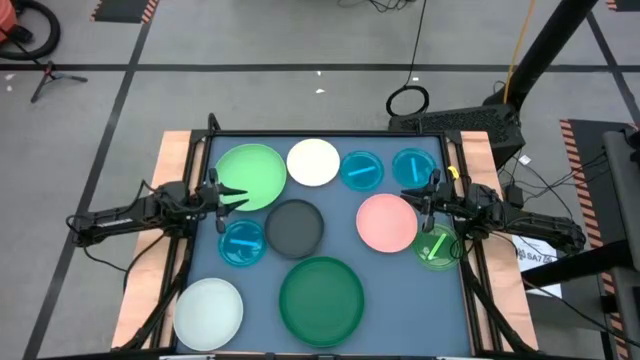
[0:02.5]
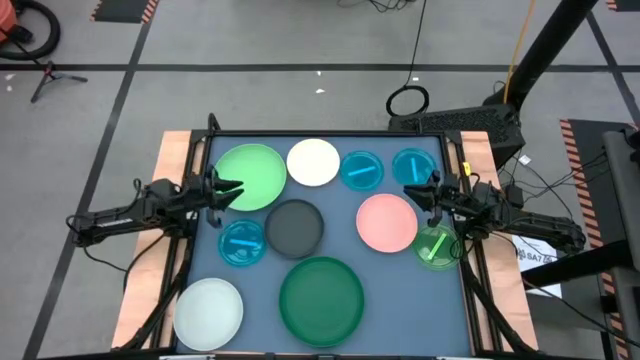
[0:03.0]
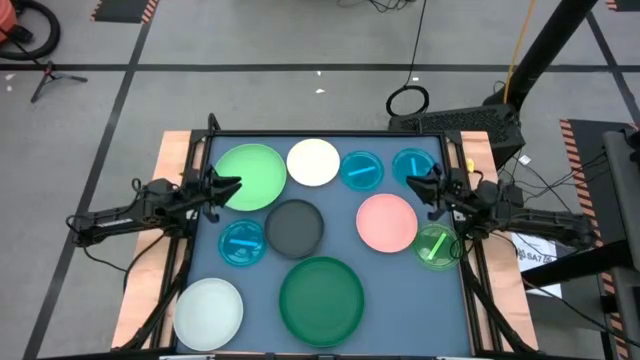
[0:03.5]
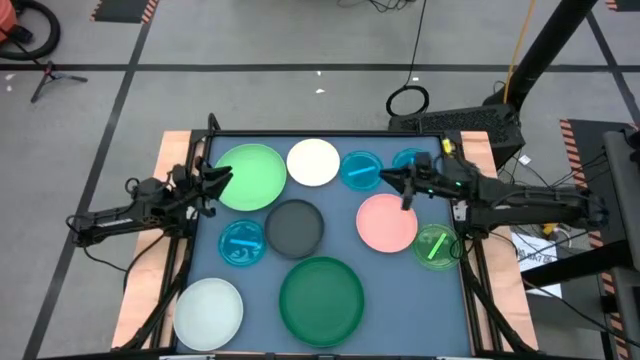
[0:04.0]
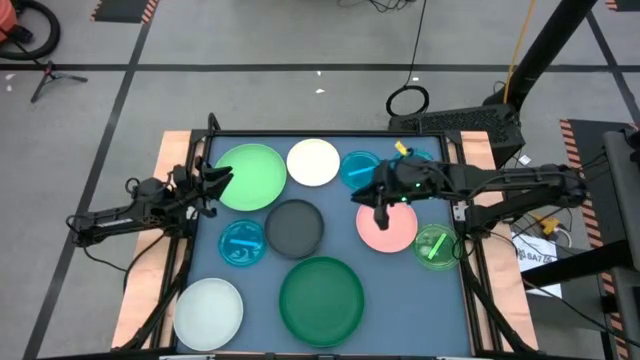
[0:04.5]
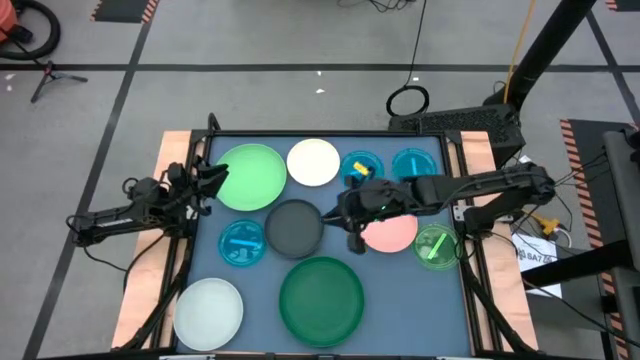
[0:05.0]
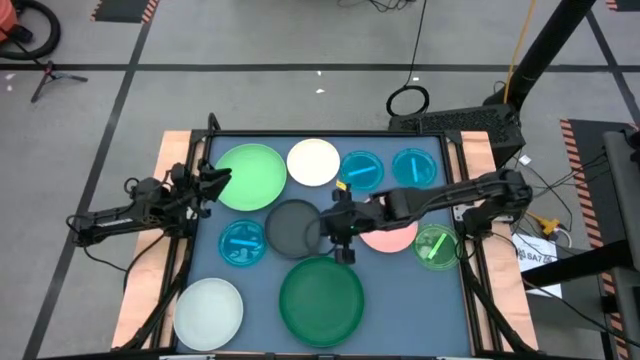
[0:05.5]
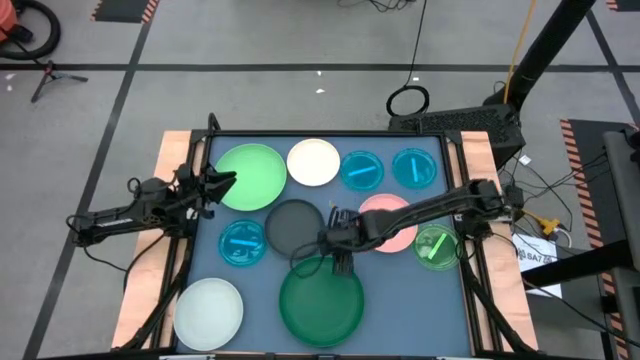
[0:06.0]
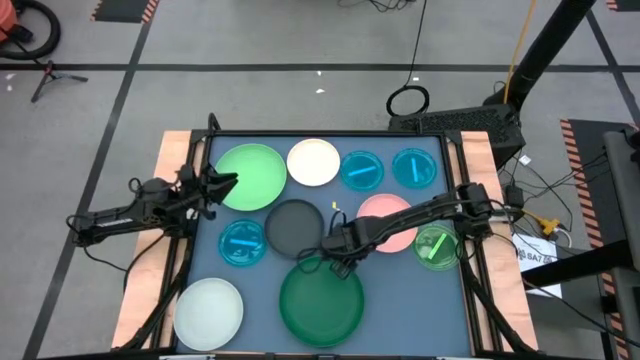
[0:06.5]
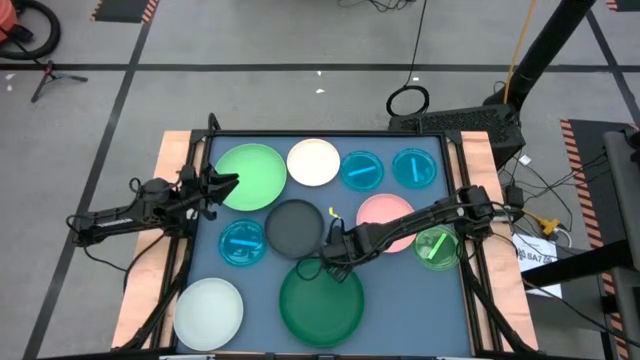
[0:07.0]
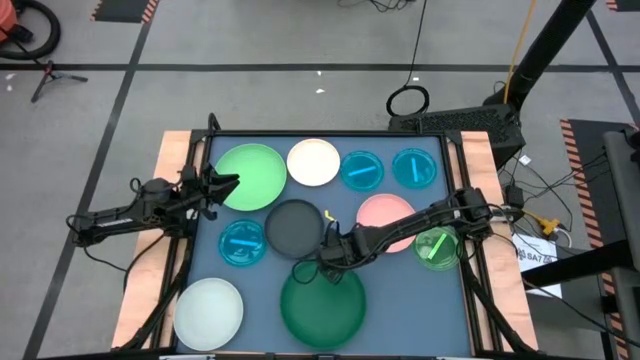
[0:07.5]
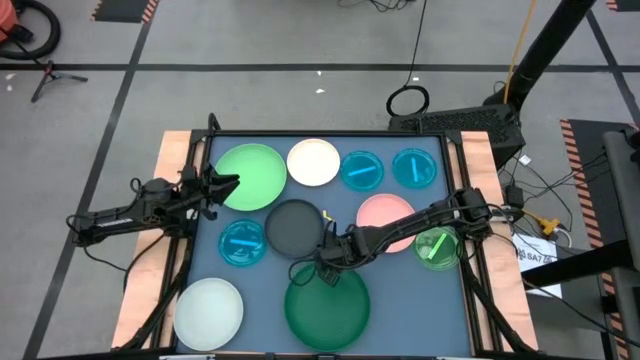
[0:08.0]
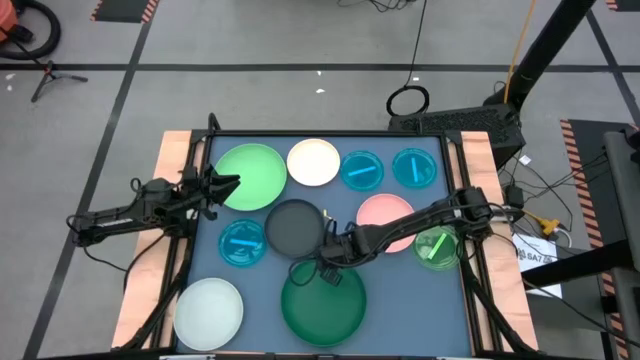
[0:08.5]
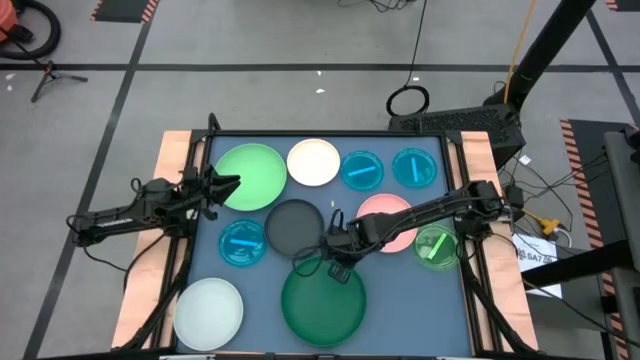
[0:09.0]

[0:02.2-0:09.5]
Task: Stack plastic plates
Stack the dark green plate on top of the green plate

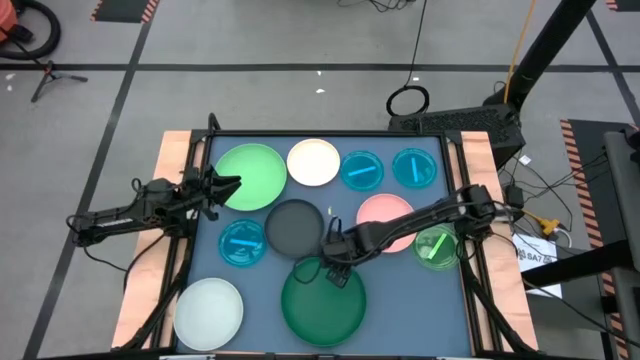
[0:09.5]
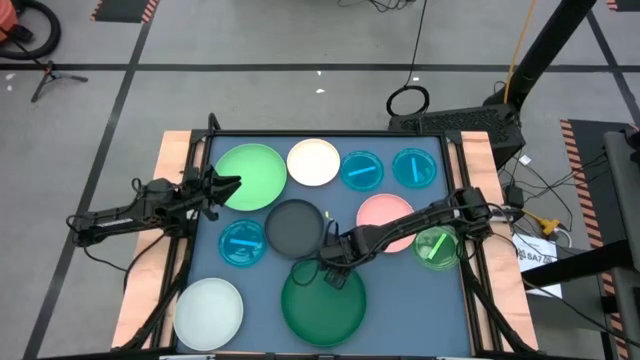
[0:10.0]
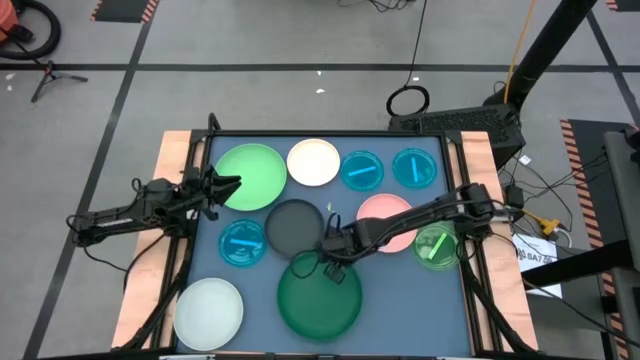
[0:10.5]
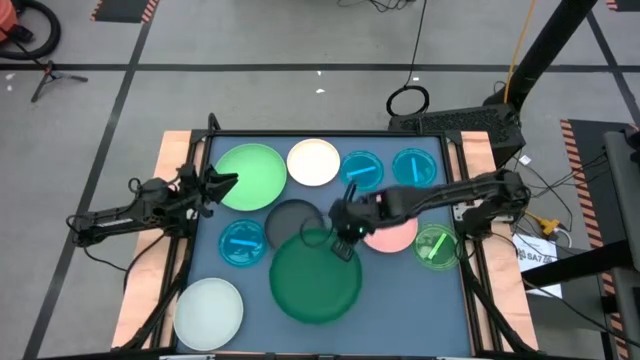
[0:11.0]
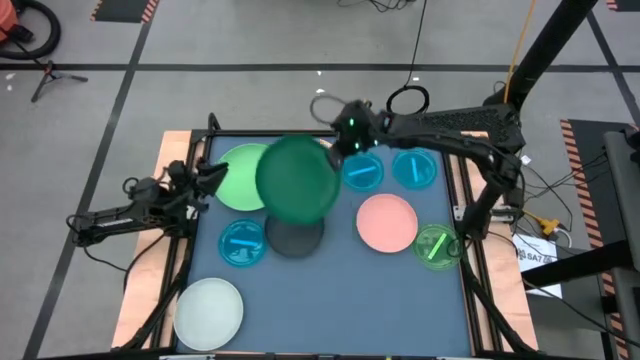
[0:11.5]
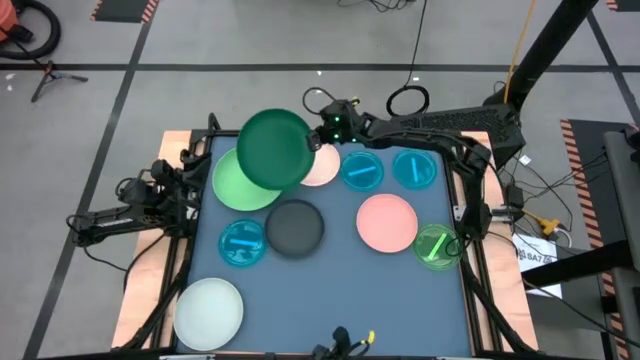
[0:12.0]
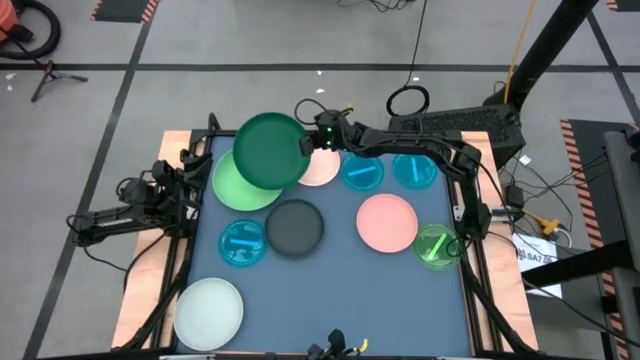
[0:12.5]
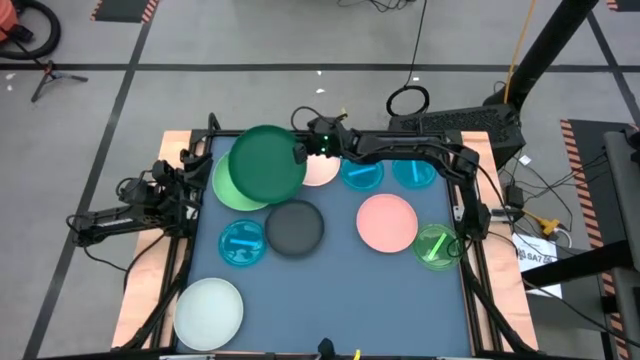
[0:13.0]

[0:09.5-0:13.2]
Stack the dark green plate on top of the green plate

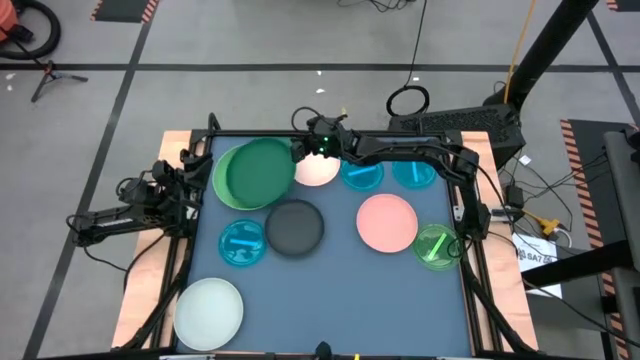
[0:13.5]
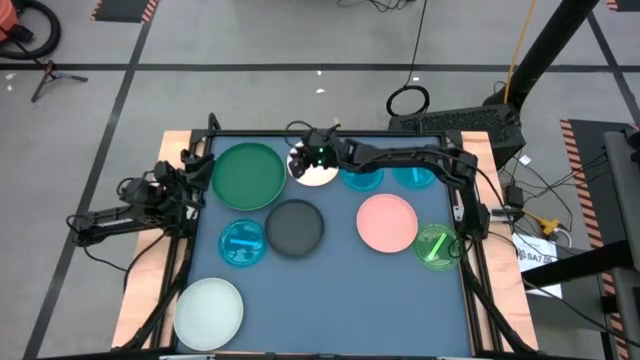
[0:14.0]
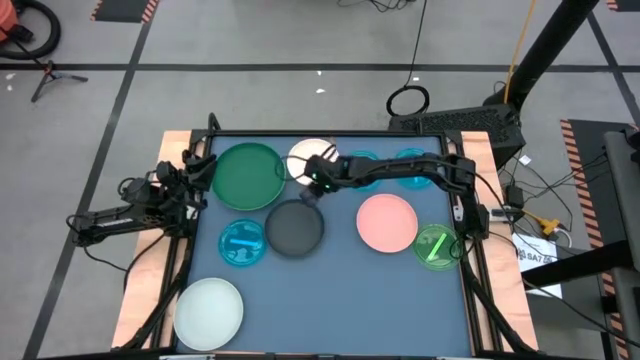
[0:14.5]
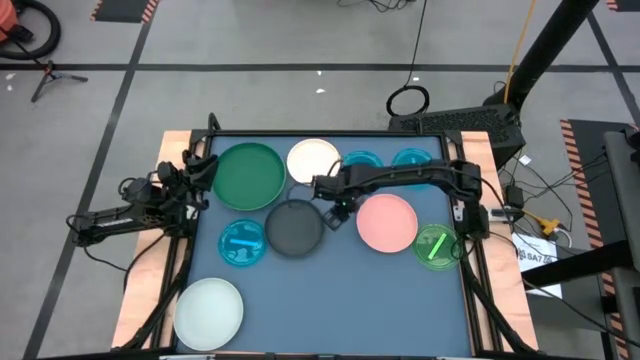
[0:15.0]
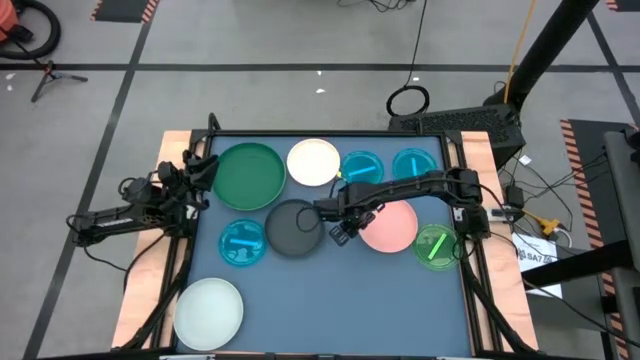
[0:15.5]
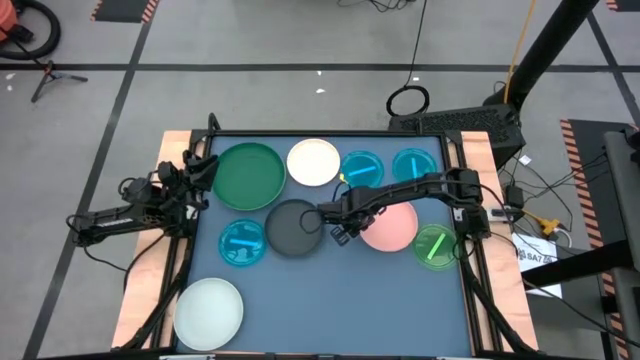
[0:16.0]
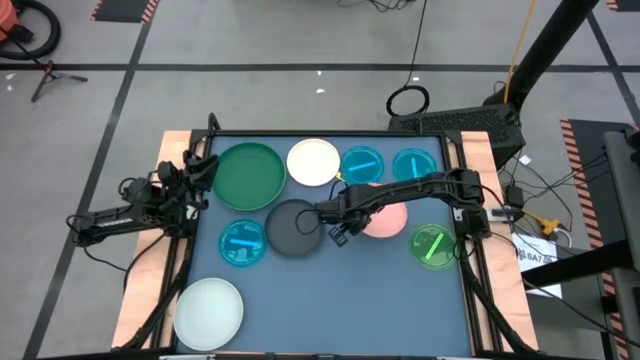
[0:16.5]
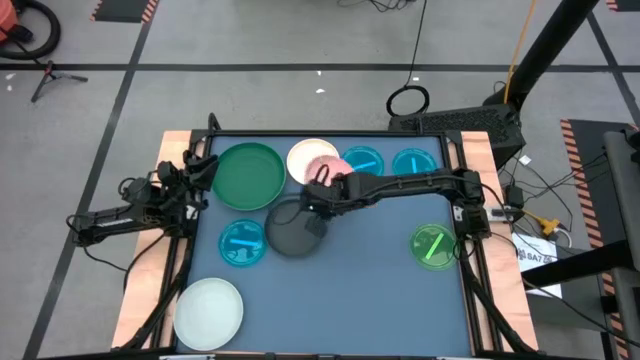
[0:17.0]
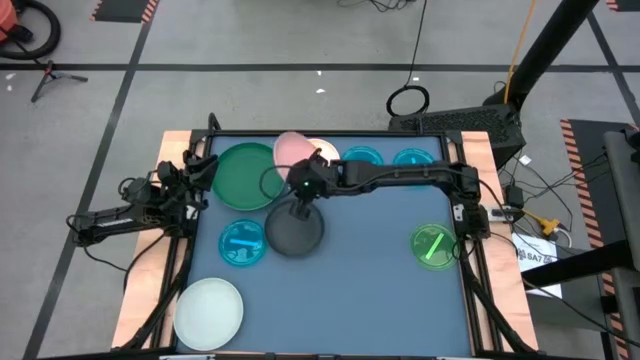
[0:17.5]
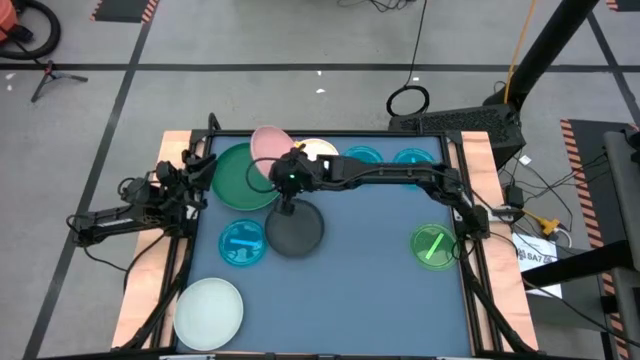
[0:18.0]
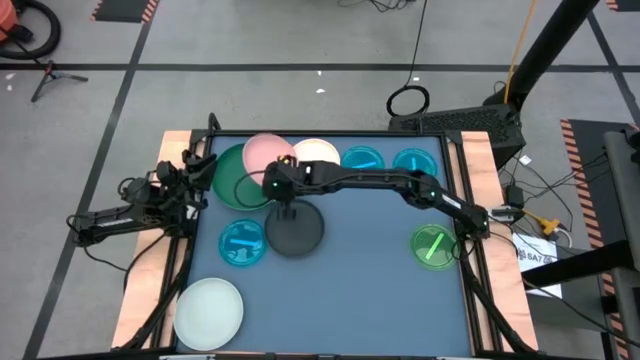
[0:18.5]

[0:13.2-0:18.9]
Stack the pink plate on top of the dark green plate

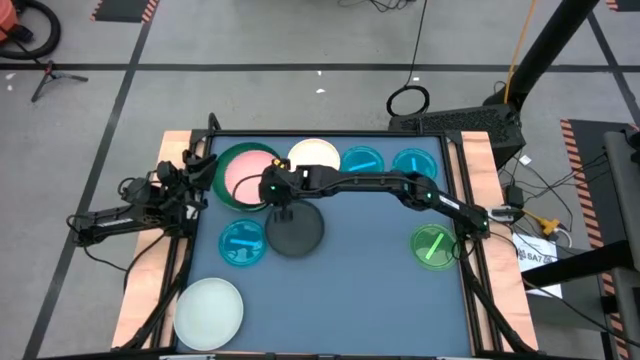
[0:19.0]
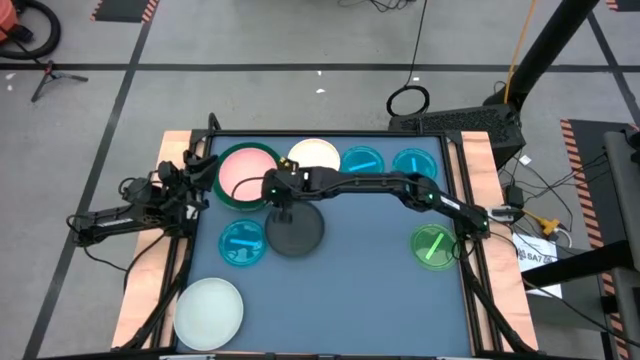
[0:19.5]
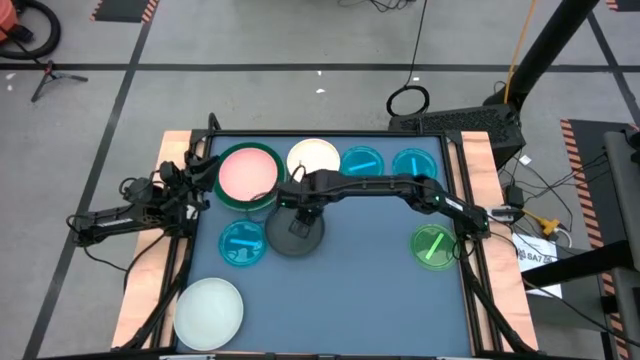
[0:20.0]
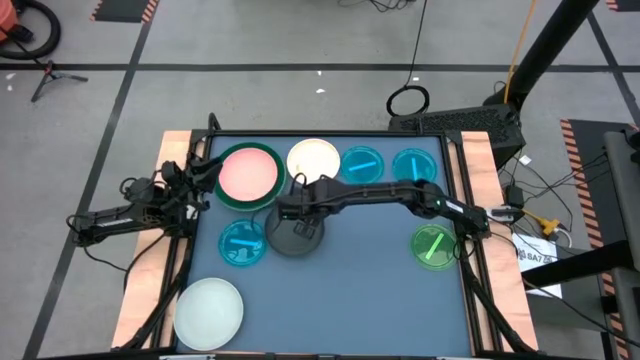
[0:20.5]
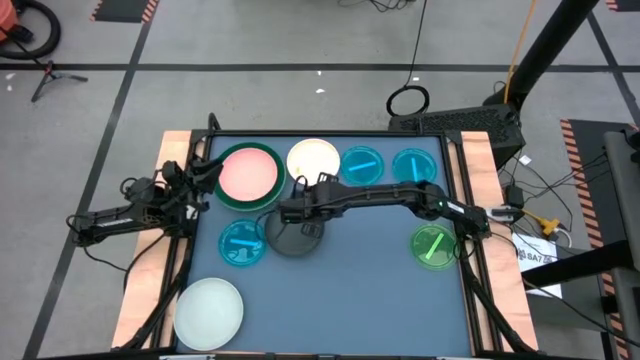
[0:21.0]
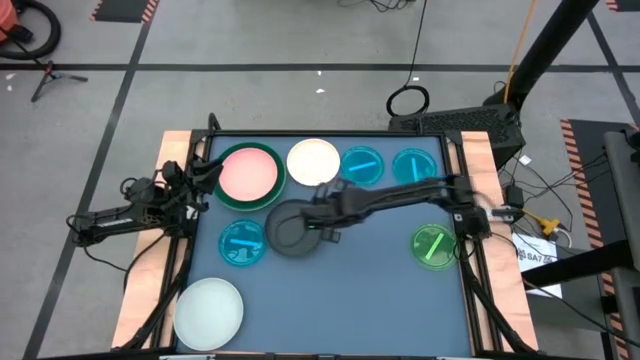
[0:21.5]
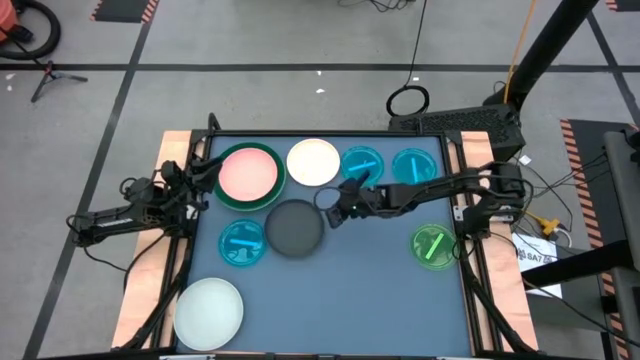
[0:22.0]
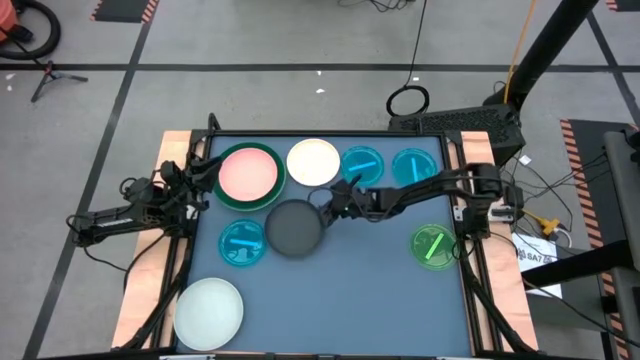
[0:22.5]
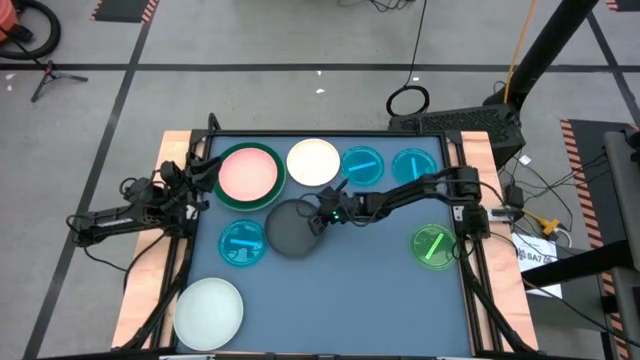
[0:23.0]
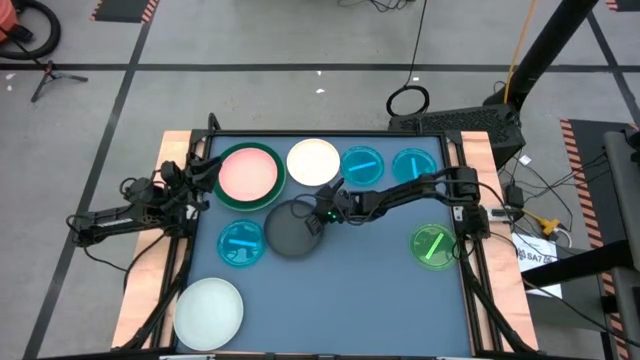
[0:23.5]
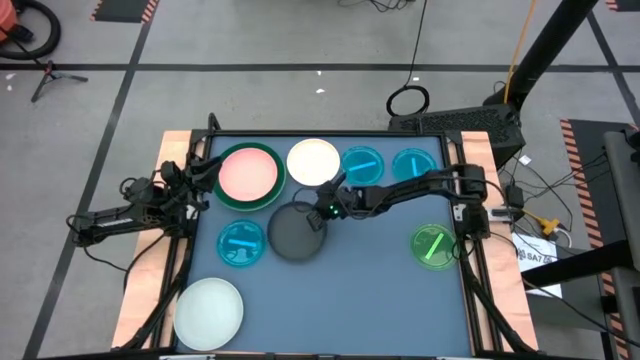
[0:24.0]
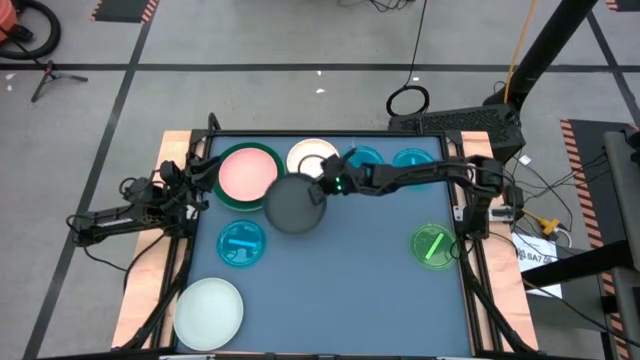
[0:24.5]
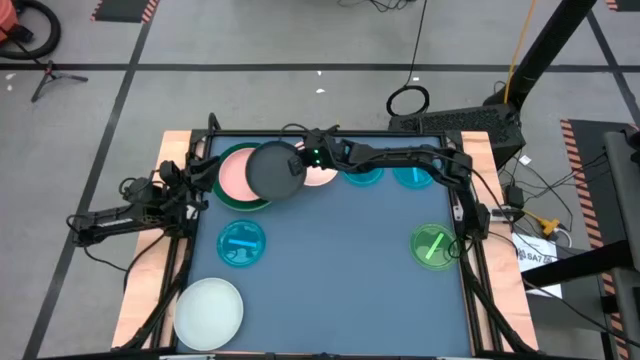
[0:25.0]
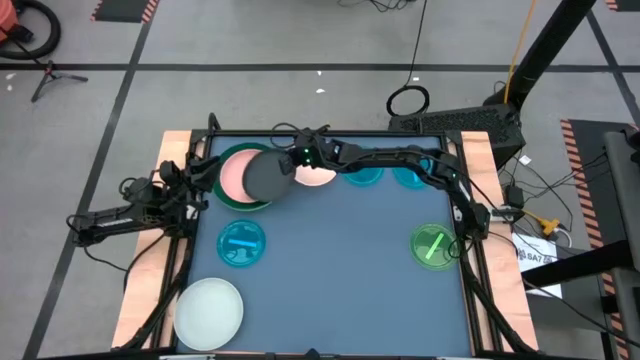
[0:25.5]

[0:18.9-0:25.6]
Stack the black plate on top of the pink plate
